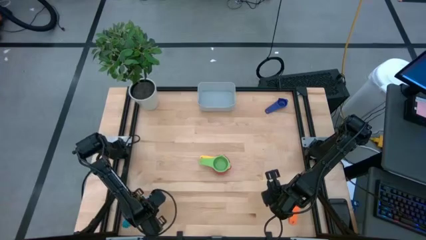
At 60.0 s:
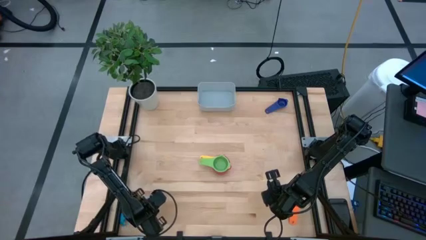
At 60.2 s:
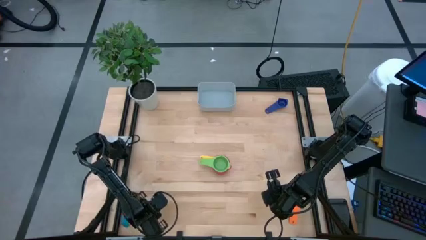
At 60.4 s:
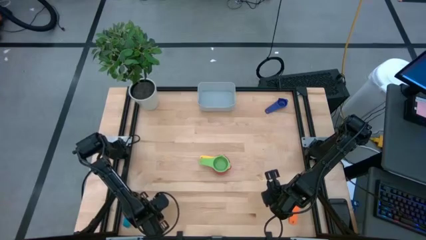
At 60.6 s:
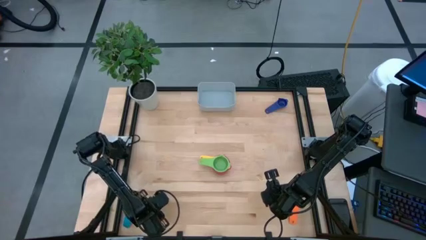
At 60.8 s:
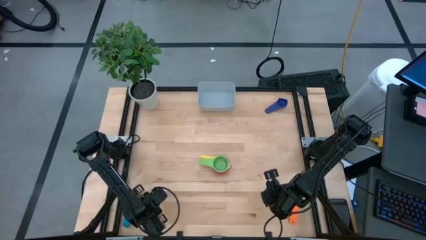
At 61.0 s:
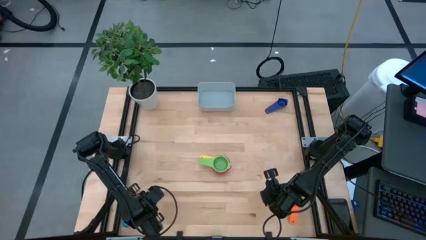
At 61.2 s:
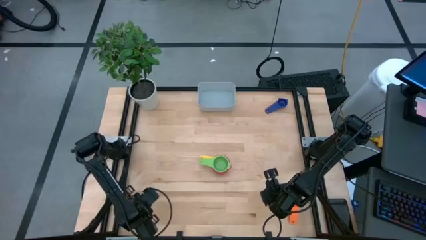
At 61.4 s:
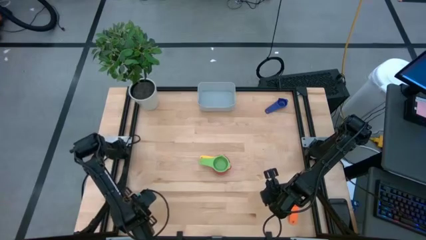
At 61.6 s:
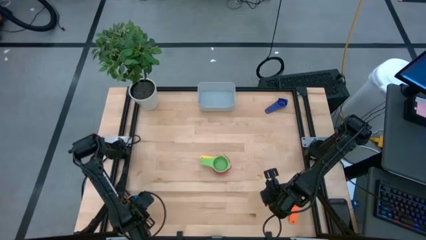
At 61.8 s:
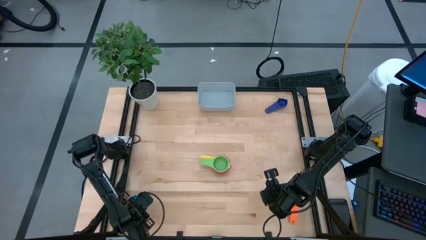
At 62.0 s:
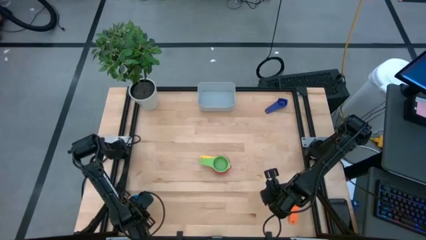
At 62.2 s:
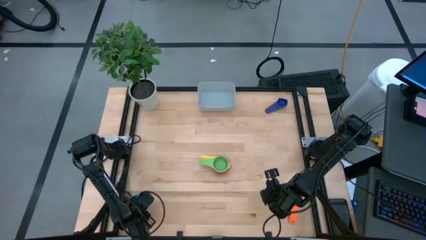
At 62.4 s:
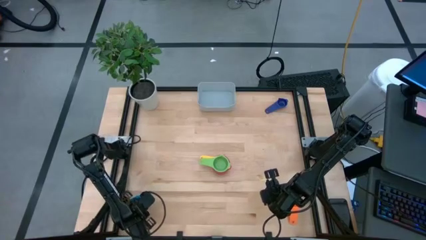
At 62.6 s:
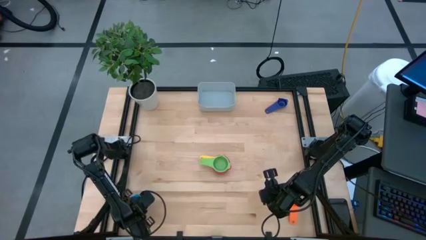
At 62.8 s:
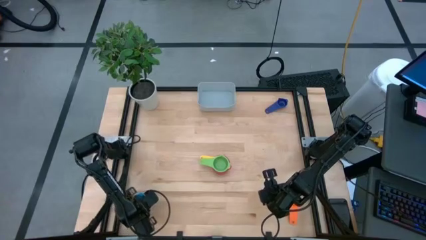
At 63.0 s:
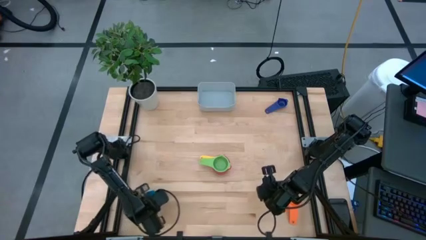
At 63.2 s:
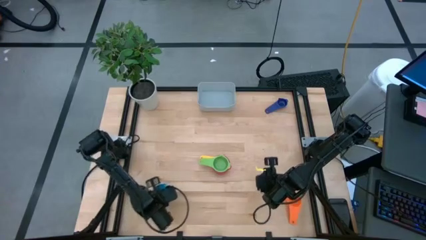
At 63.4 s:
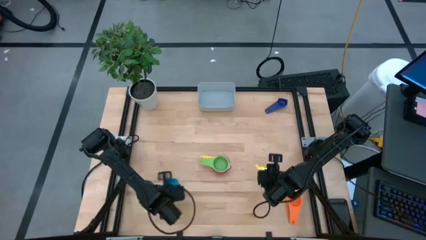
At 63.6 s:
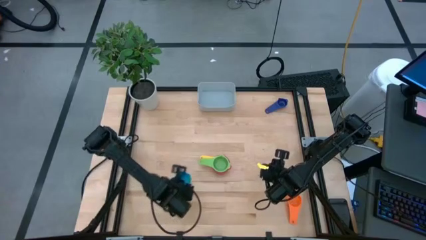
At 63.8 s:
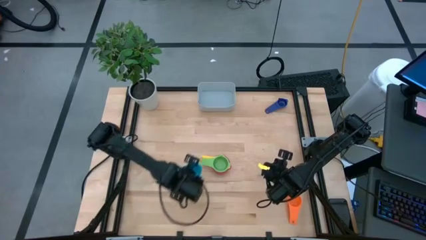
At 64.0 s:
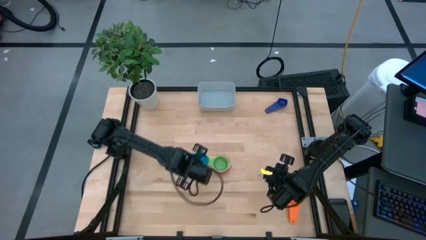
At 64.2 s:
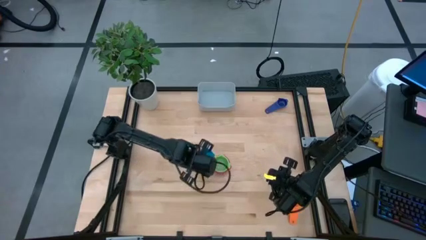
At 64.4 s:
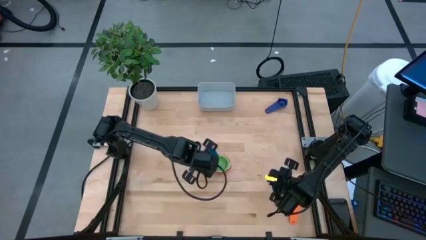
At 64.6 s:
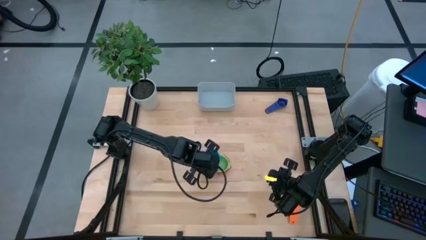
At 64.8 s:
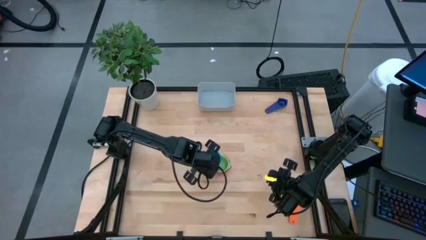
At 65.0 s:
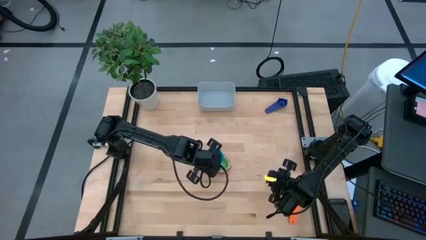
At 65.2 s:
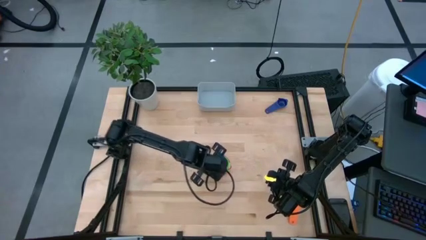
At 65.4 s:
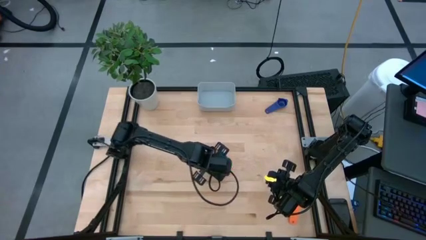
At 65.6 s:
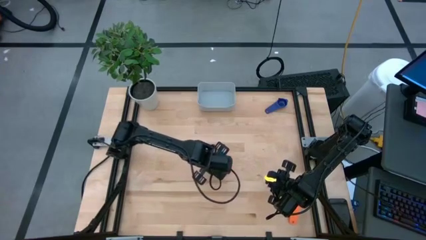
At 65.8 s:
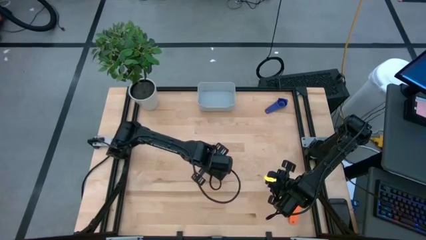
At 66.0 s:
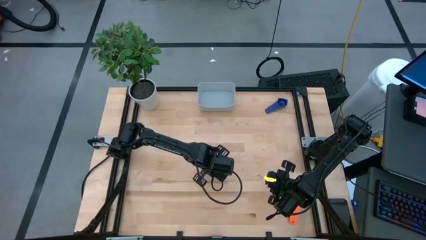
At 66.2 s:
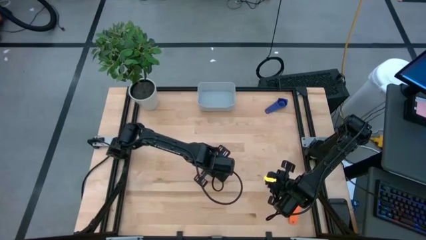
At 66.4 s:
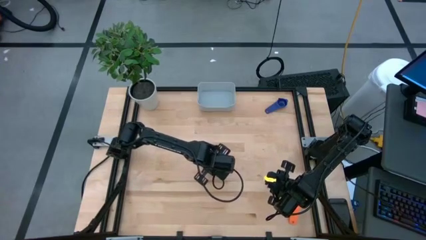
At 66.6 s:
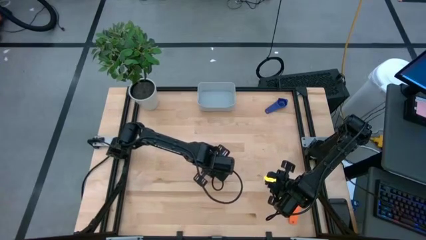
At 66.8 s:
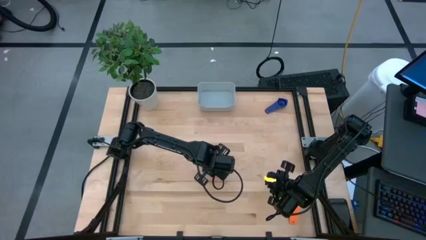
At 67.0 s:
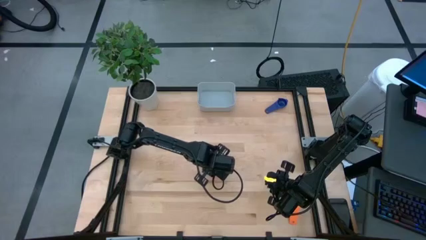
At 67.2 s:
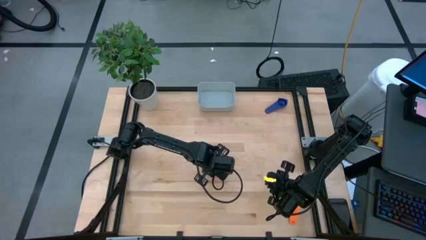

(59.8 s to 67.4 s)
Task: Nest measuring cups in basket
Stack the light blue measuring cup on top of the green measuring cup

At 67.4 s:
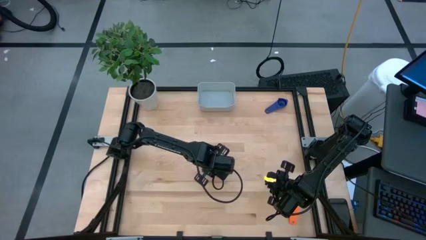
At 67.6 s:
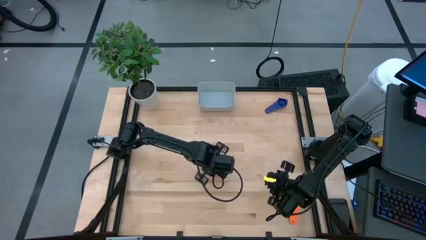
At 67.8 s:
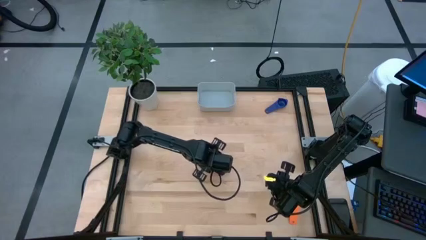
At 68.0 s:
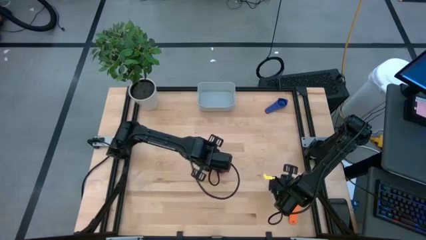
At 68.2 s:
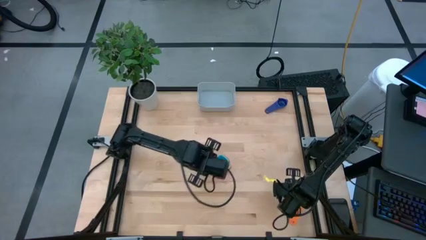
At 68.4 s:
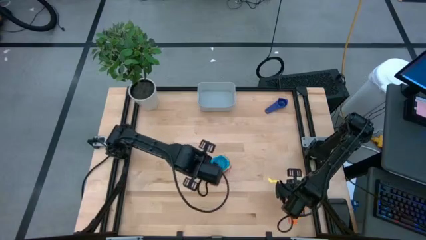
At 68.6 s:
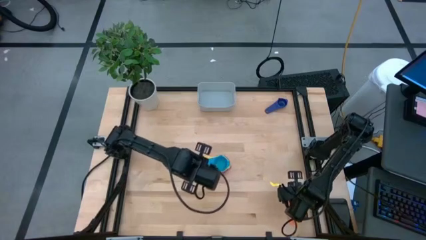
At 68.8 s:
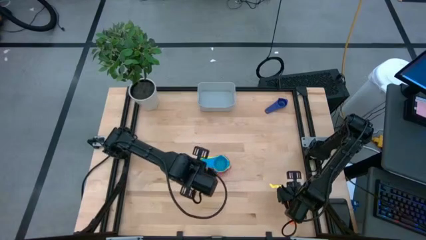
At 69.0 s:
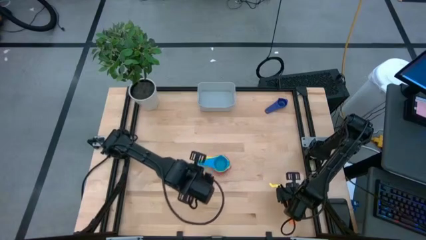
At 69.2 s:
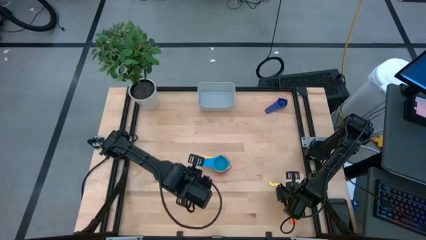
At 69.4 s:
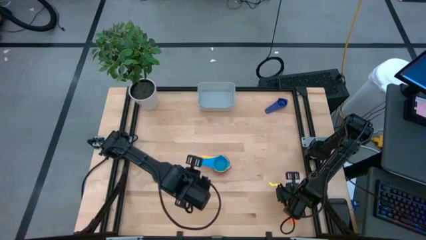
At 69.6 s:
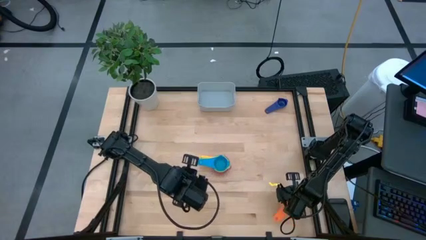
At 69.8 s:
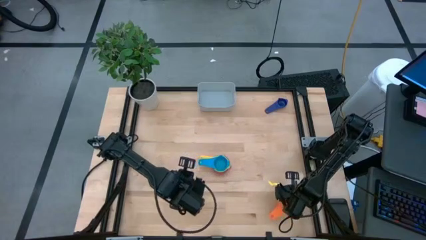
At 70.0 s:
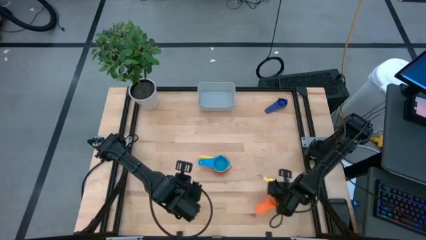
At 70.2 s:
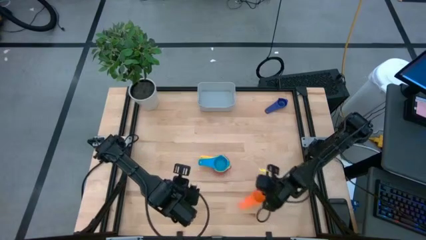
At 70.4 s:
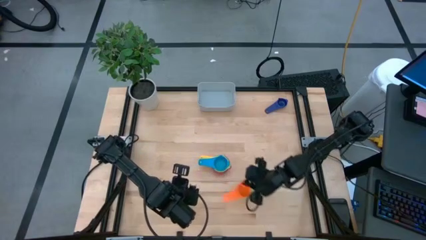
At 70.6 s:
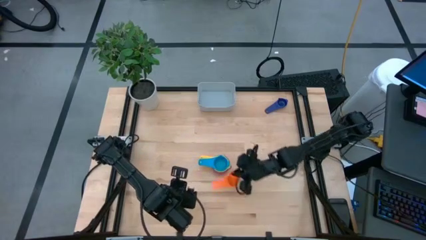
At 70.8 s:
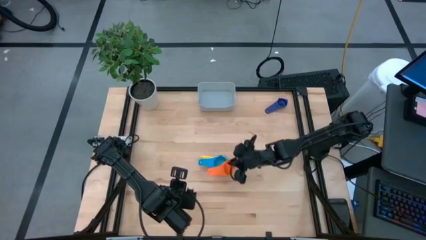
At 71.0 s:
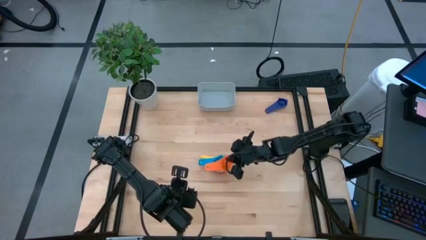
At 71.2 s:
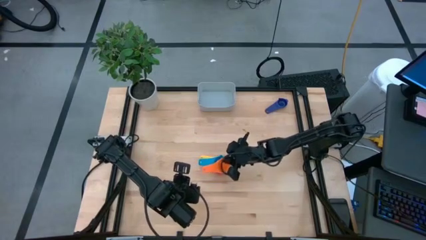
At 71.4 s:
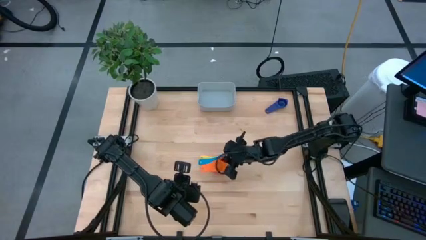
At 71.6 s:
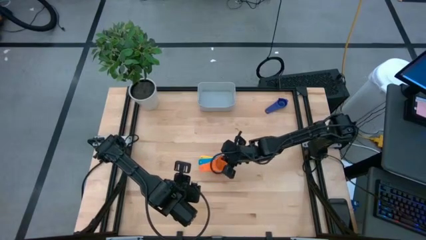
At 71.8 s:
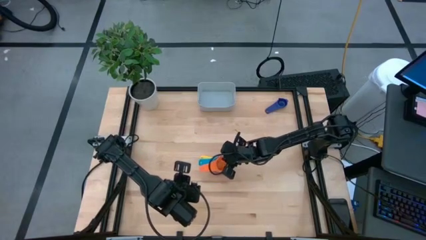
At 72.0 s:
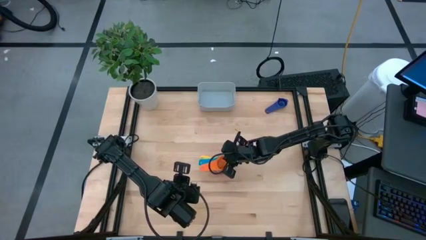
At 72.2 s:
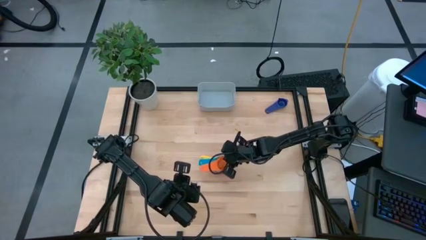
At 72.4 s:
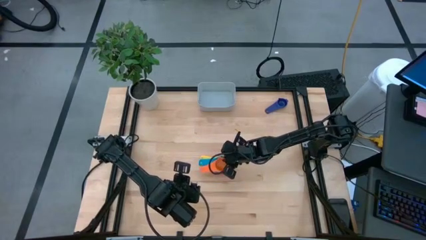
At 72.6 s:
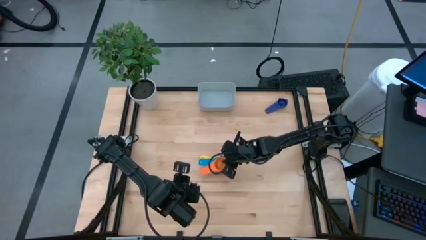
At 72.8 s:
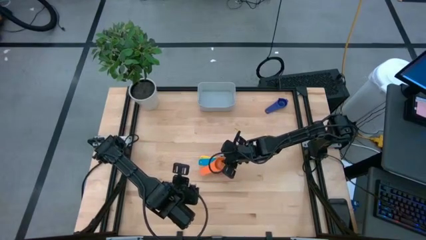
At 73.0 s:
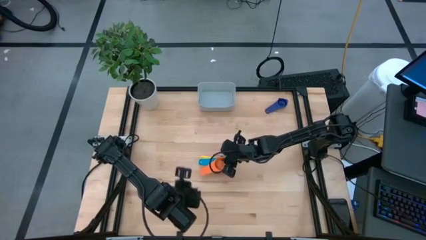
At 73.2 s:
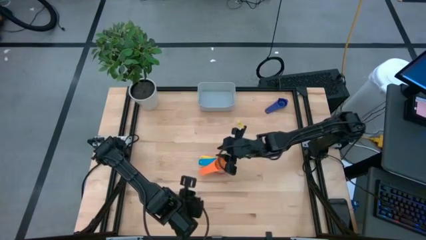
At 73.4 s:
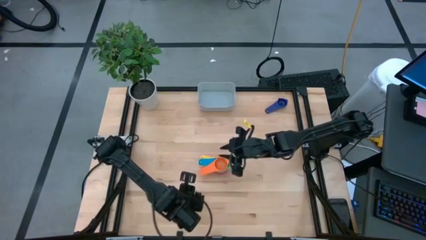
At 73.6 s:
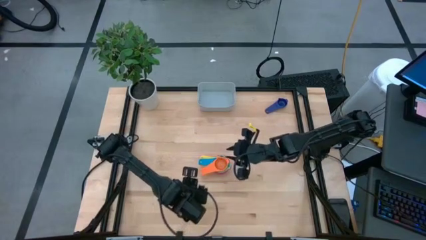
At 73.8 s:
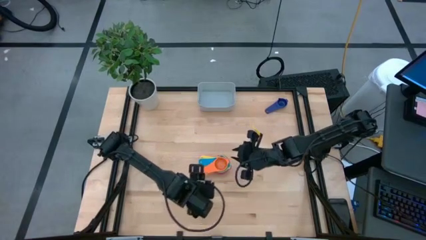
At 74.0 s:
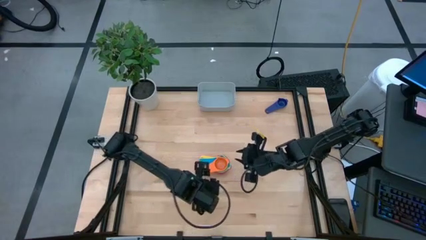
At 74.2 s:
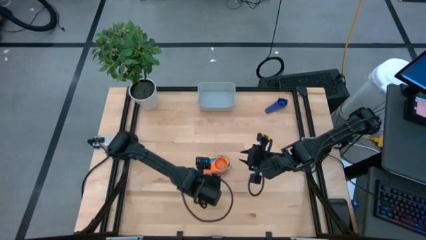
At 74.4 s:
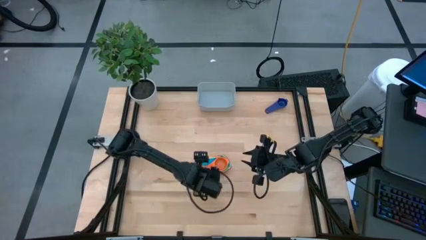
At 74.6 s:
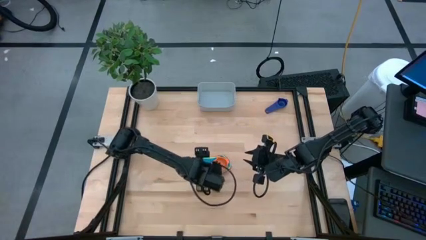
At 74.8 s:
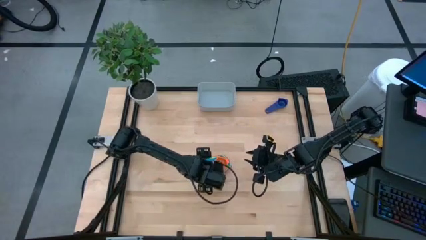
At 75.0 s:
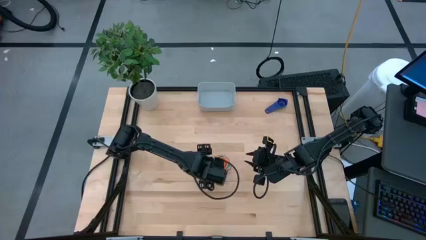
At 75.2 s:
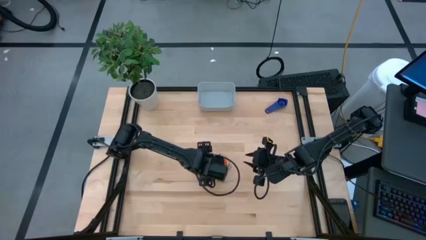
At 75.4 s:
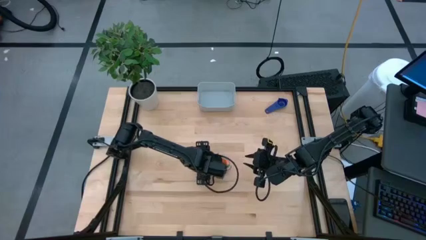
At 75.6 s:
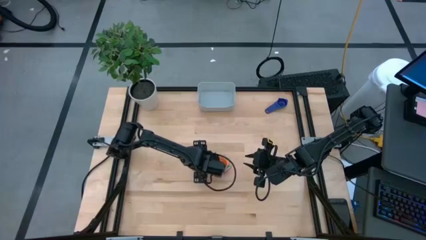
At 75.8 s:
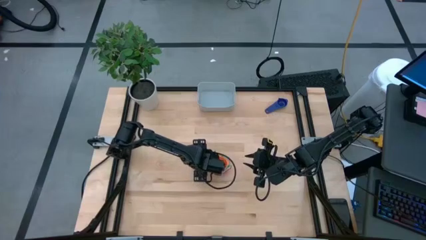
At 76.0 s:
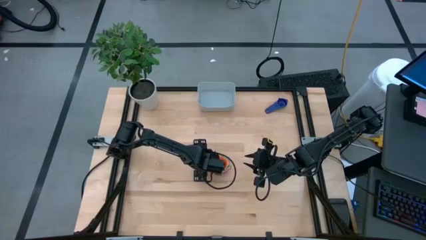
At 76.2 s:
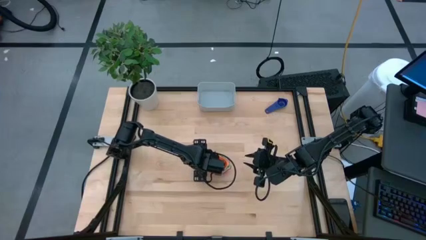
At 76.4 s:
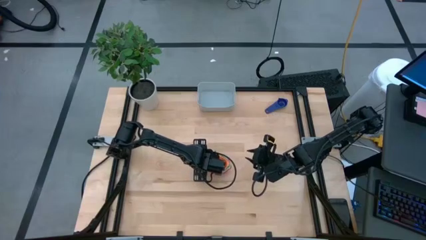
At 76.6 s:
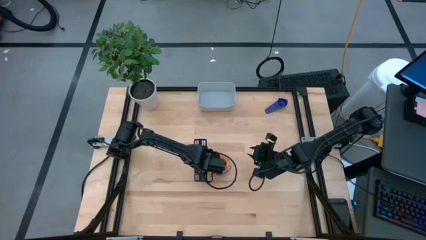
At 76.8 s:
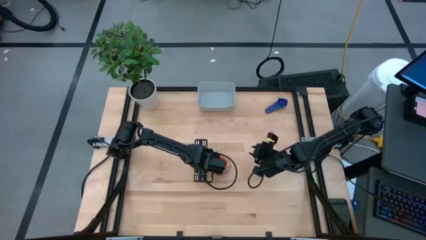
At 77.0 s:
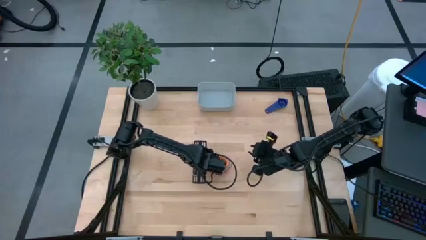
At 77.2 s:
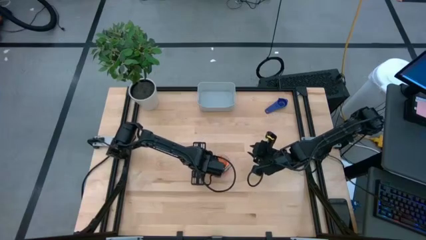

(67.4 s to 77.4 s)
Stack the orange measuring cup on top of the light blue measuring cup
